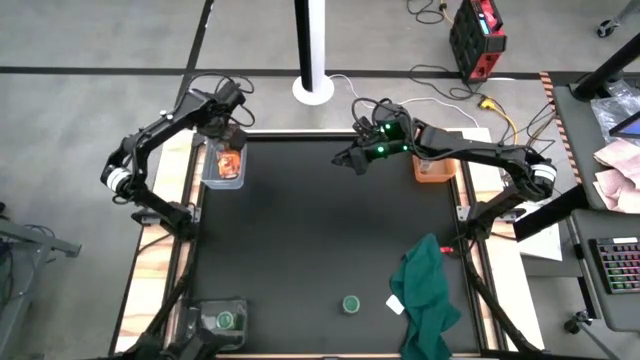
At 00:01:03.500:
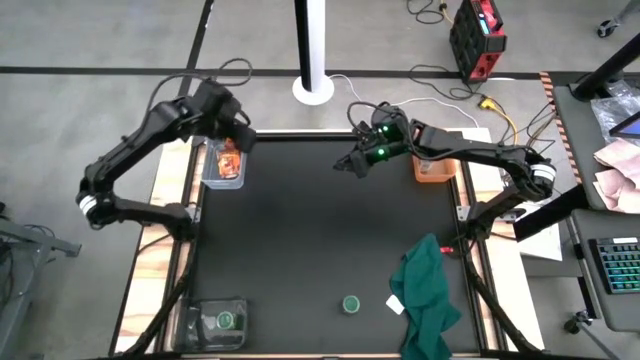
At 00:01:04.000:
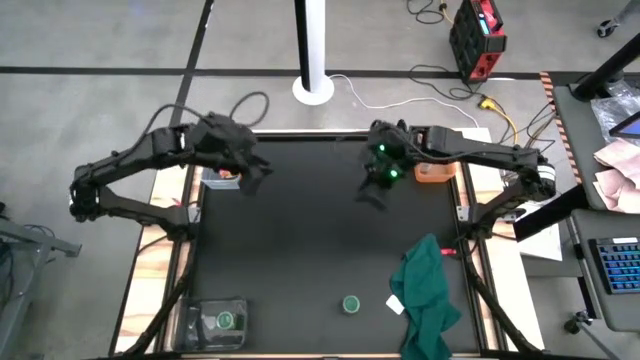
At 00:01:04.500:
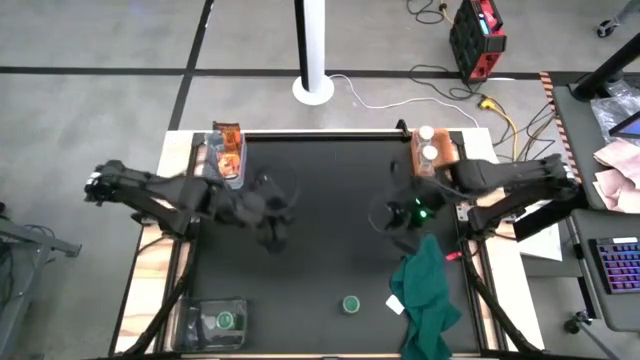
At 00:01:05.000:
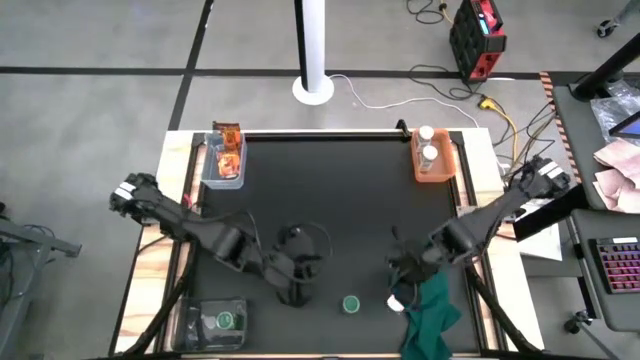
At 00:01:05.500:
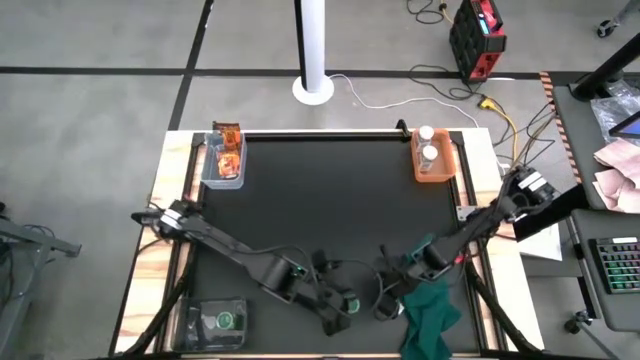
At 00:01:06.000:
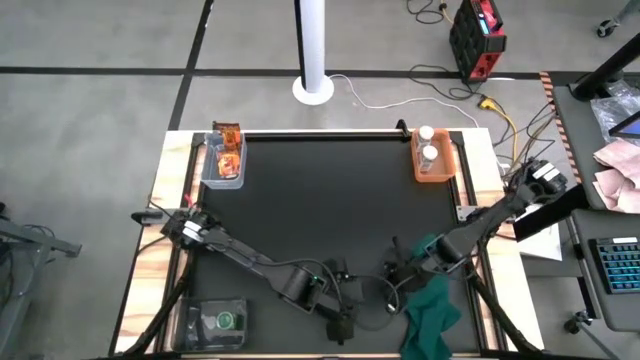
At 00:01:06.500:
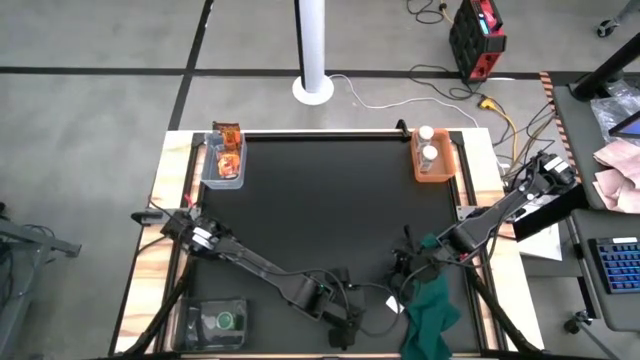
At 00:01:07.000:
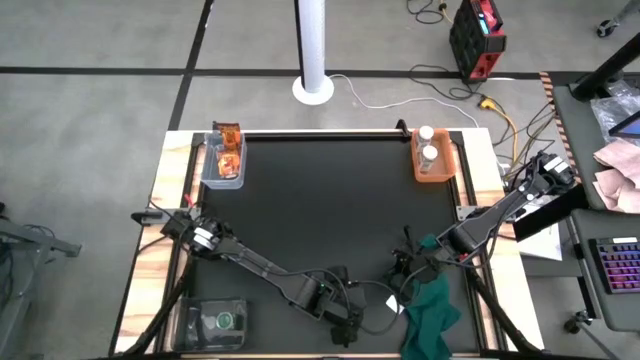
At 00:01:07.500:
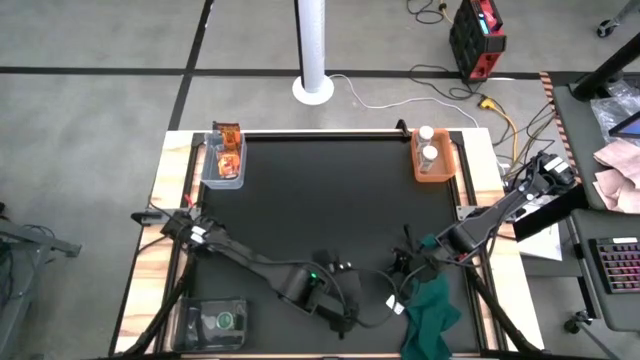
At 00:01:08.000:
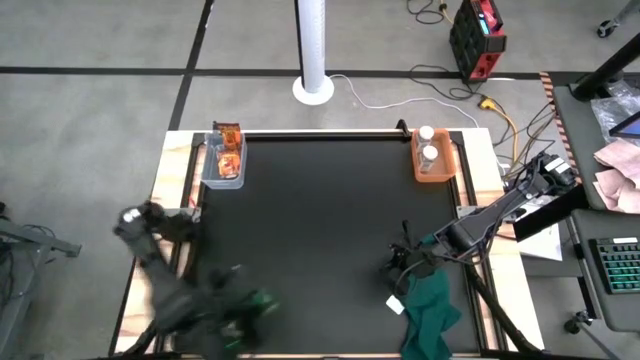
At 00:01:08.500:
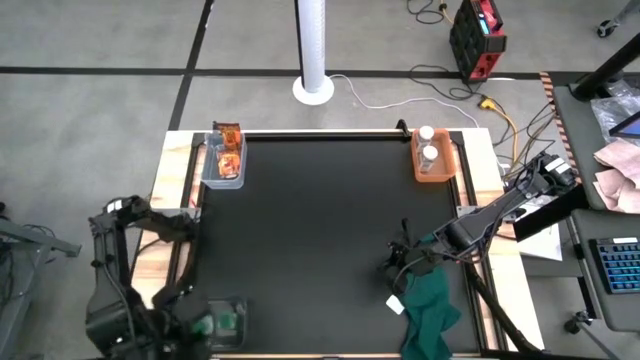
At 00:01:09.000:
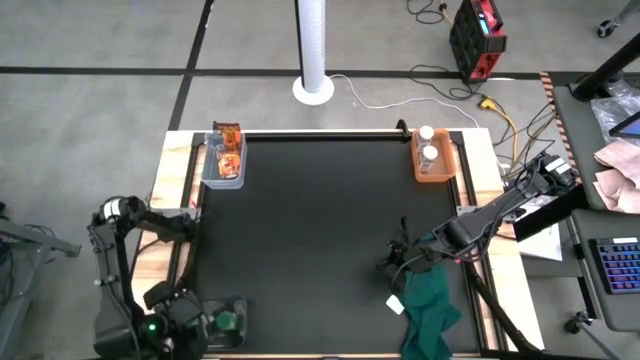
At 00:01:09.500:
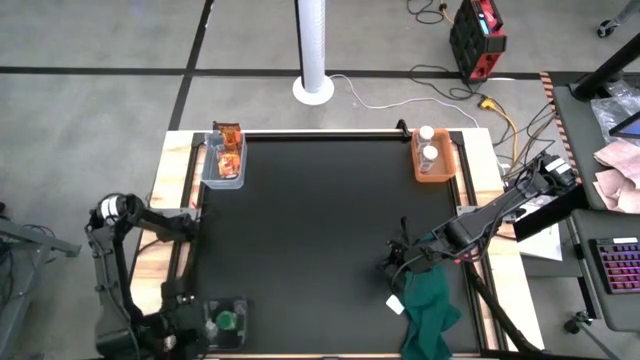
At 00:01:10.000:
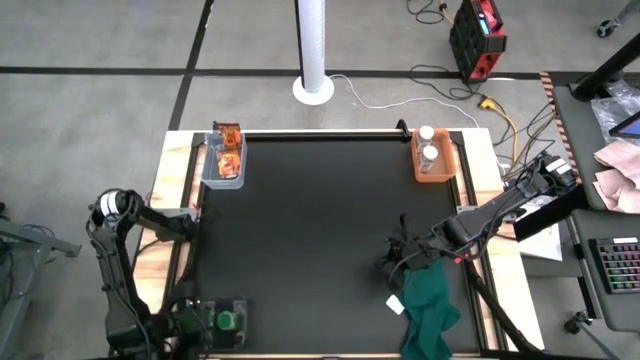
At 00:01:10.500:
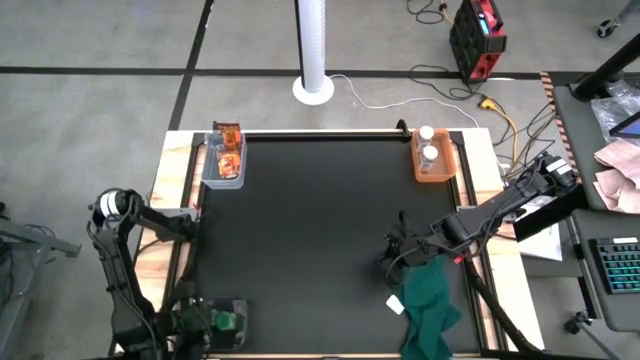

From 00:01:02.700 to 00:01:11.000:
Task: Sort spices by type
Put the green seasoning bottle into the black bin

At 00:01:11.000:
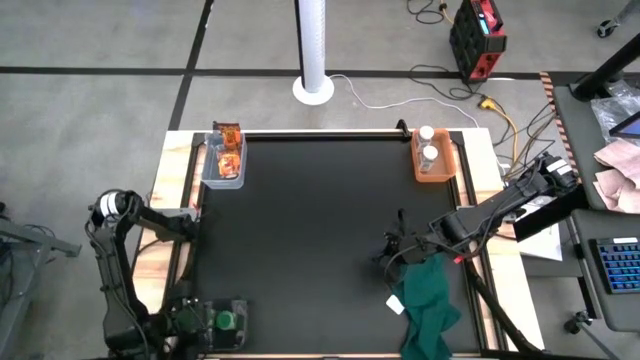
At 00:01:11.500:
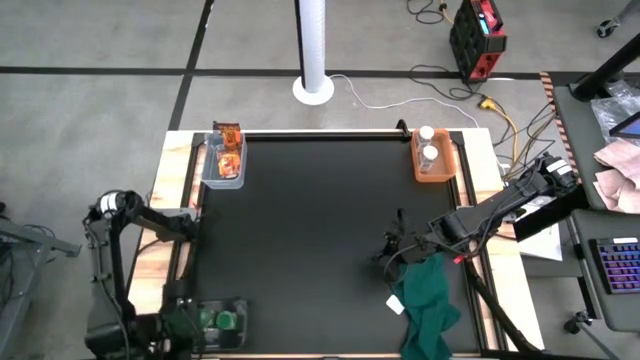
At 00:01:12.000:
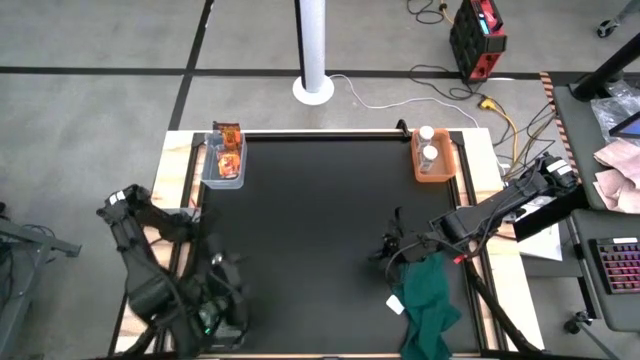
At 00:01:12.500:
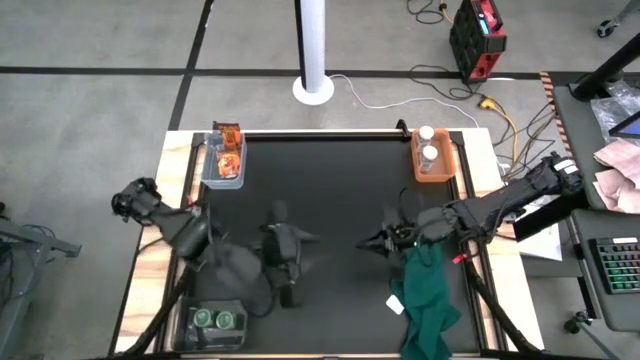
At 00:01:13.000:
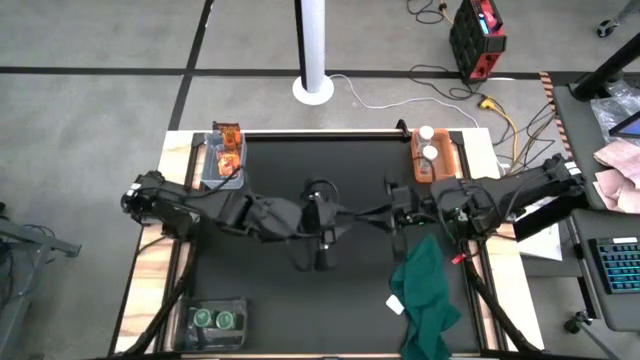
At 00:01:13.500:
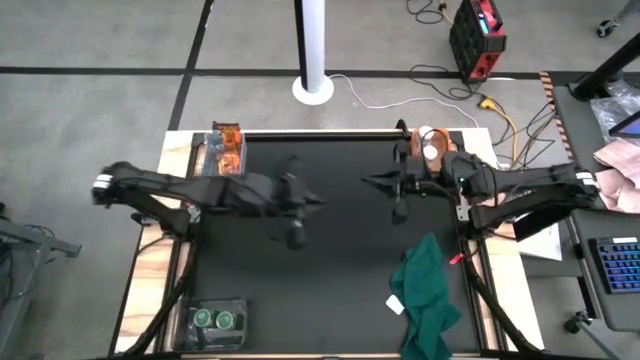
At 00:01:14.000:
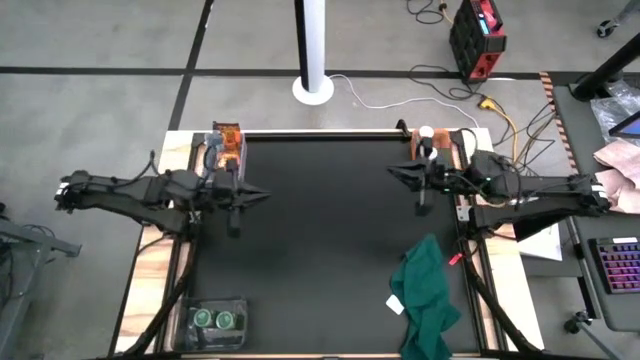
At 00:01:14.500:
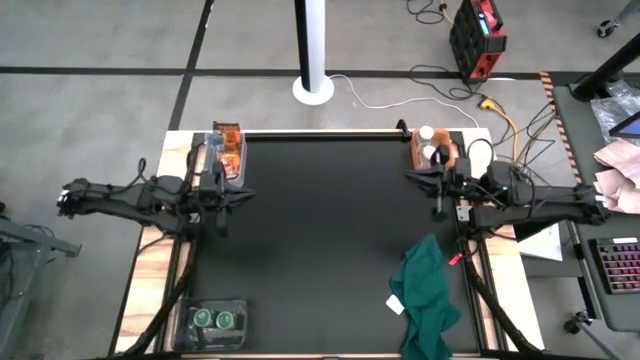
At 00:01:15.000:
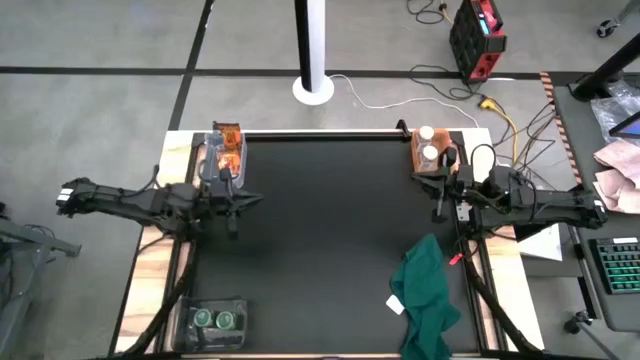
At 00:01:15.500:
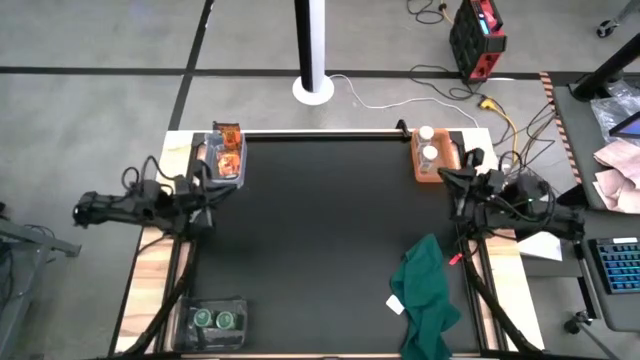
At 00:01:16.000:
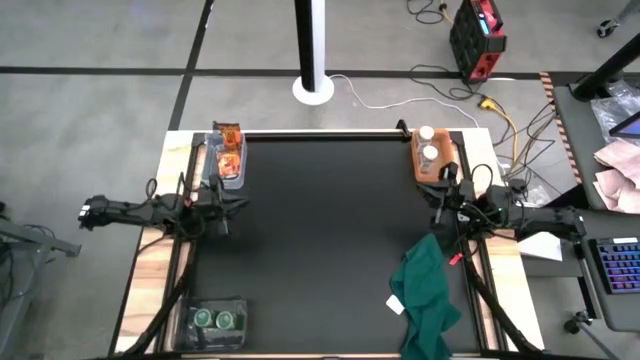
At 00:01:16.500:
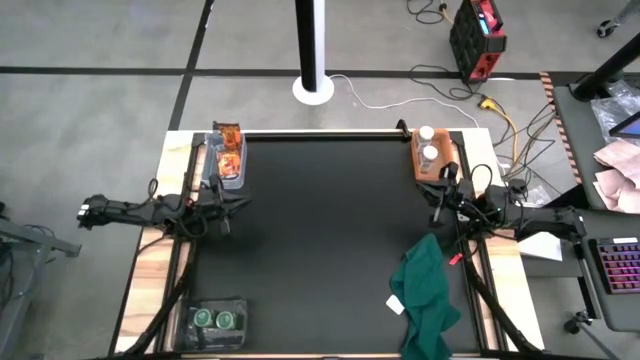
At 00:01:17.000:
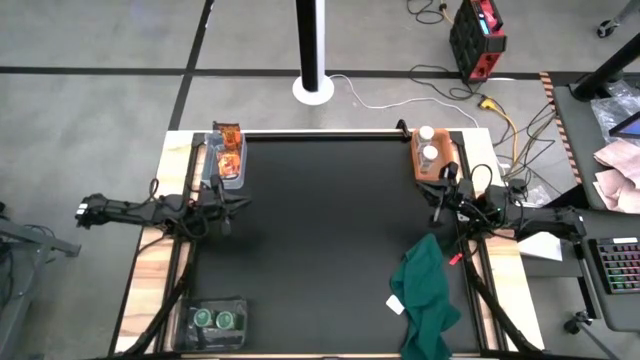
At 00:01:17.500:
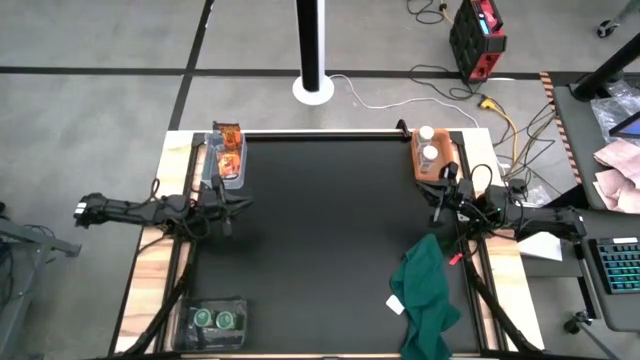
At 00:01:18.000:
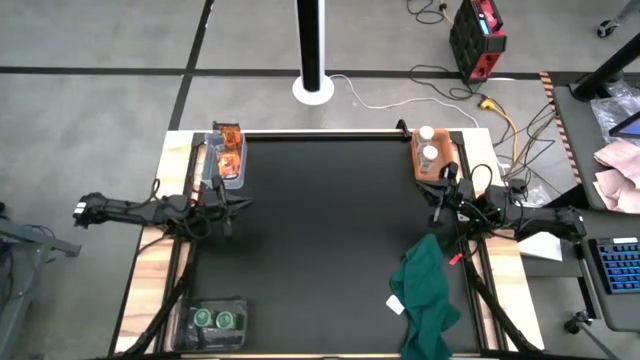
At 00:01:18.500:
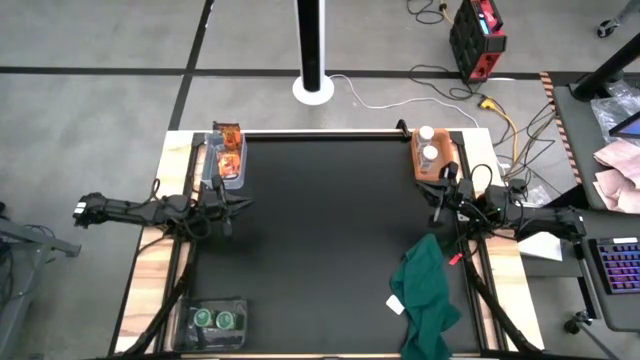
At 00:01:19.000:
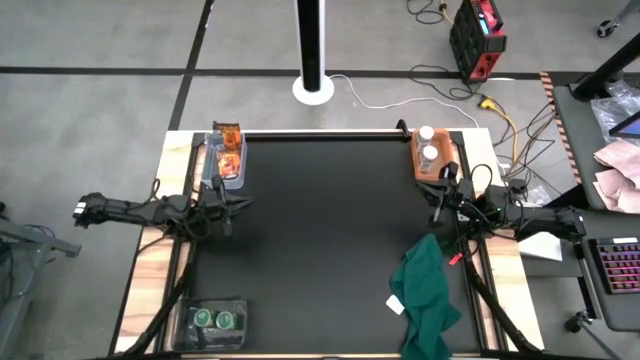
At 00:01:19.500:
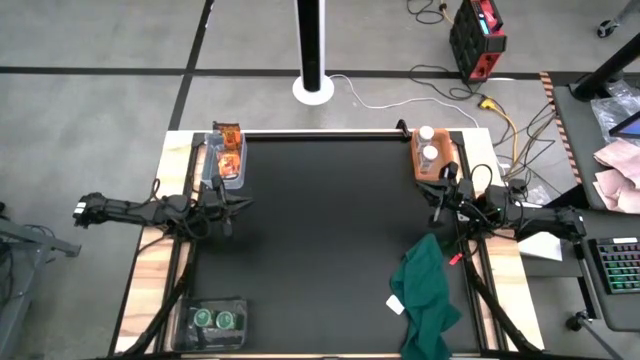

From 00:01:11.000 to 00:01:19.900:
Return to Home Position
